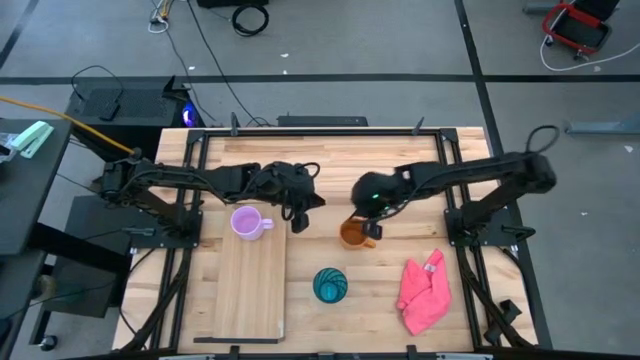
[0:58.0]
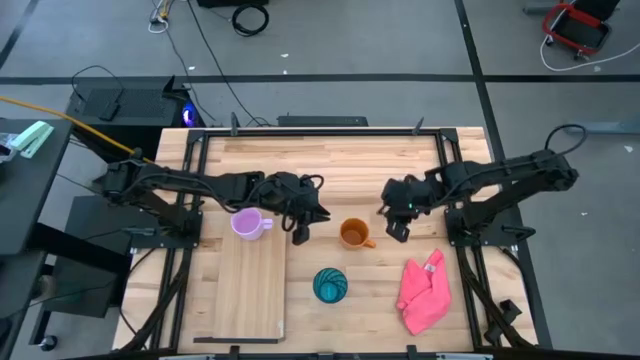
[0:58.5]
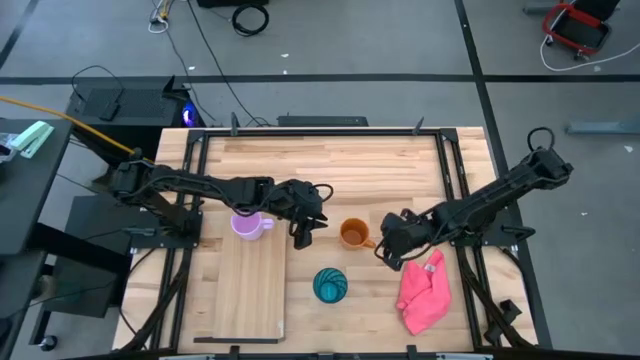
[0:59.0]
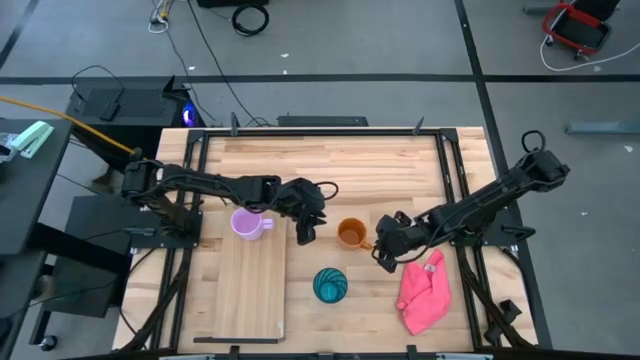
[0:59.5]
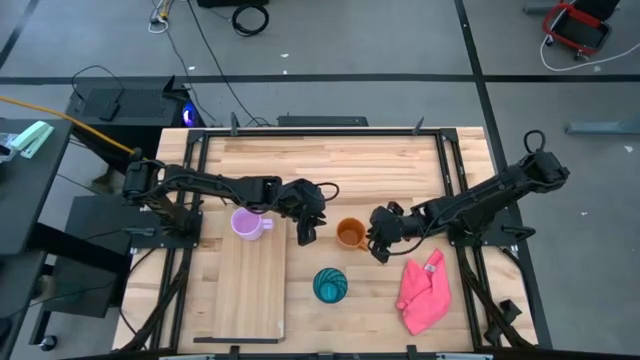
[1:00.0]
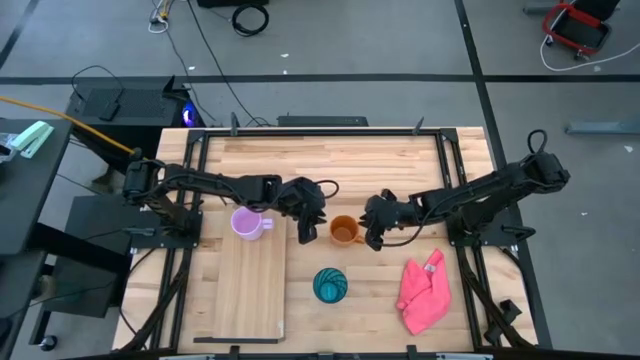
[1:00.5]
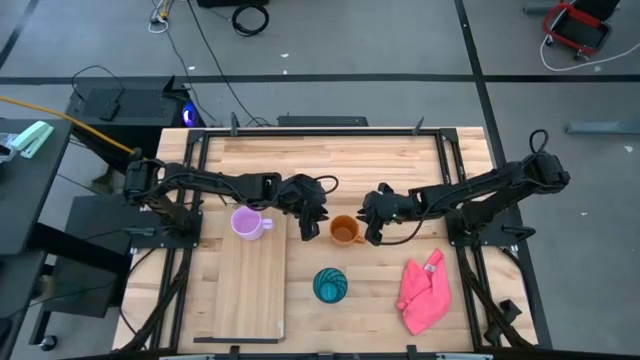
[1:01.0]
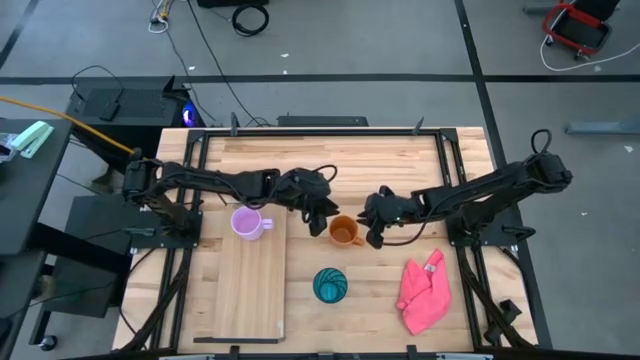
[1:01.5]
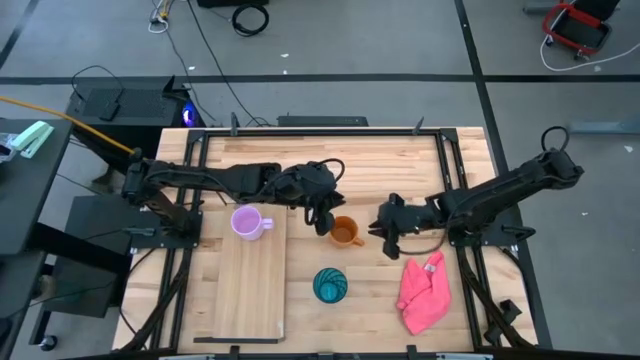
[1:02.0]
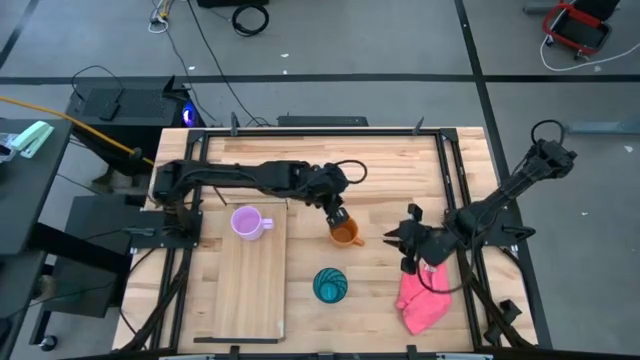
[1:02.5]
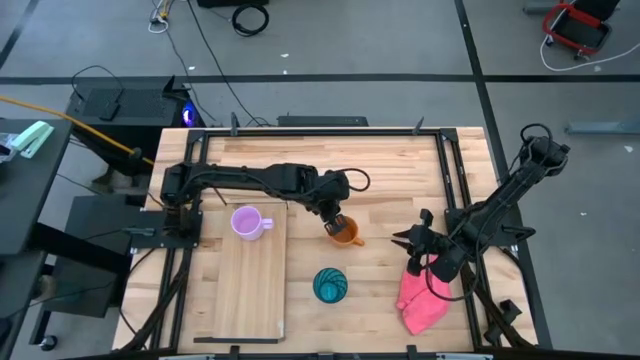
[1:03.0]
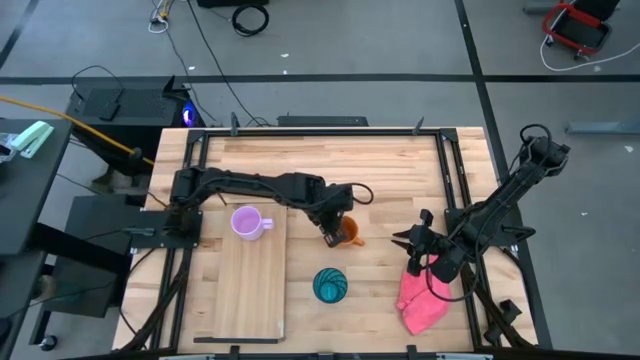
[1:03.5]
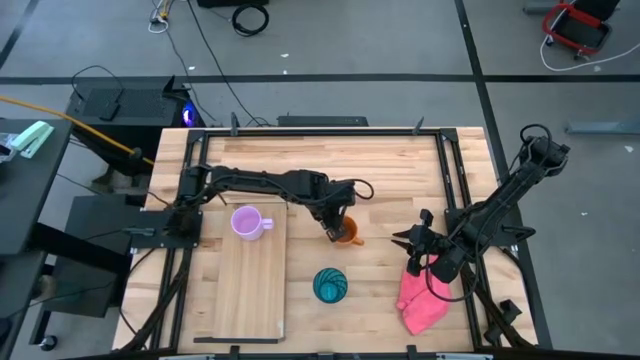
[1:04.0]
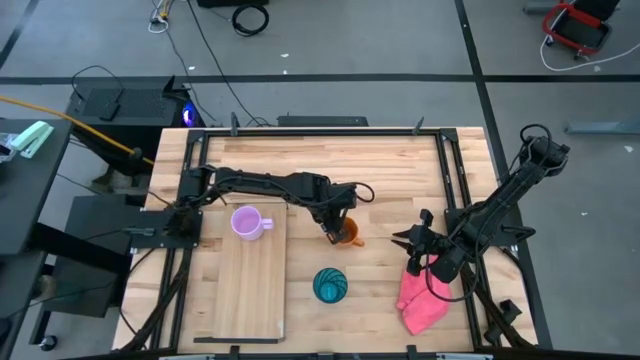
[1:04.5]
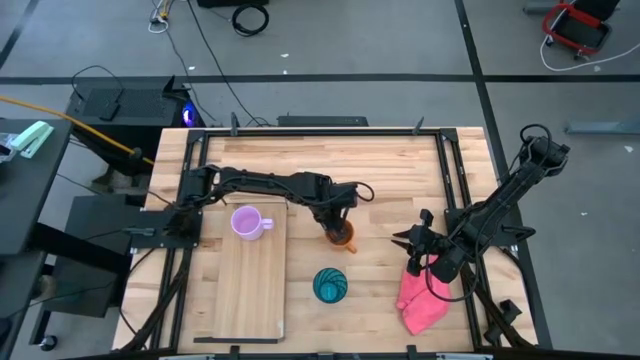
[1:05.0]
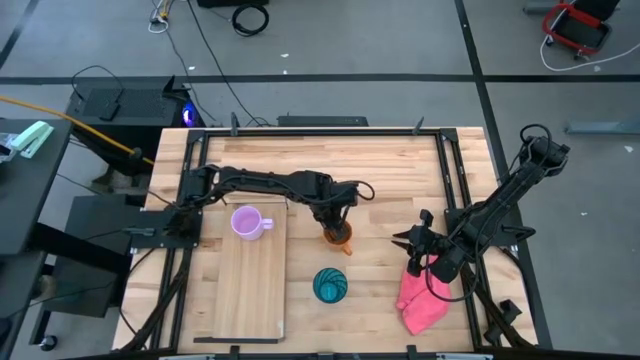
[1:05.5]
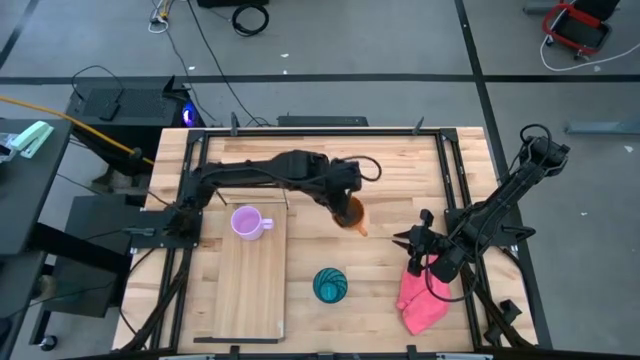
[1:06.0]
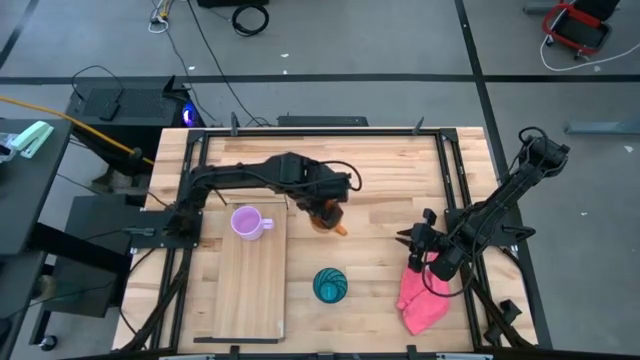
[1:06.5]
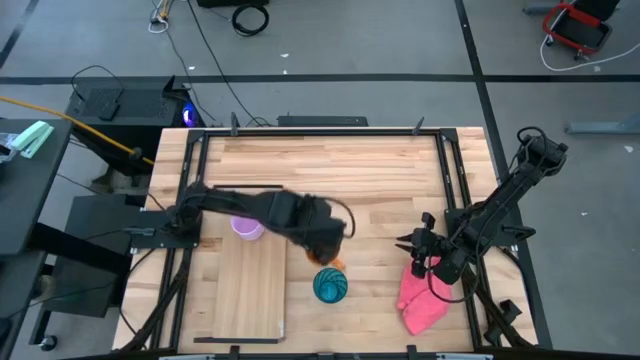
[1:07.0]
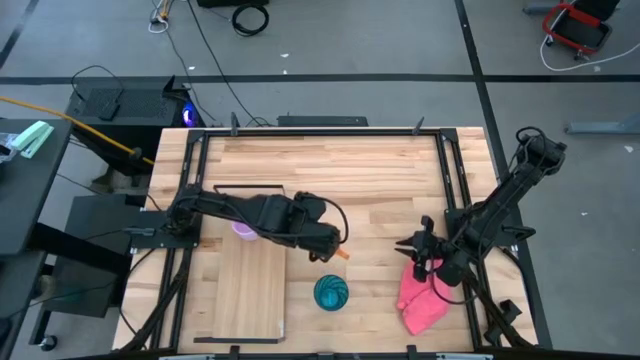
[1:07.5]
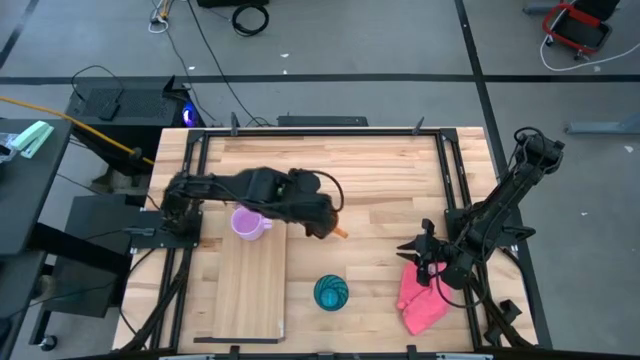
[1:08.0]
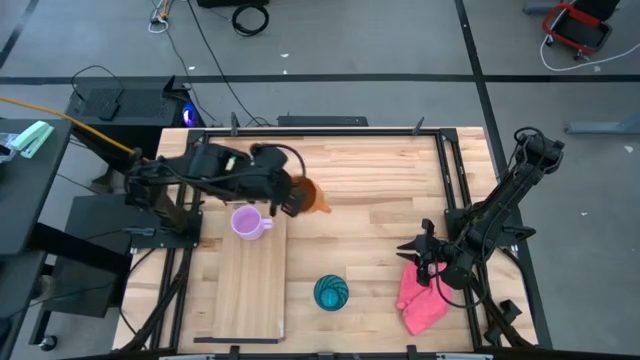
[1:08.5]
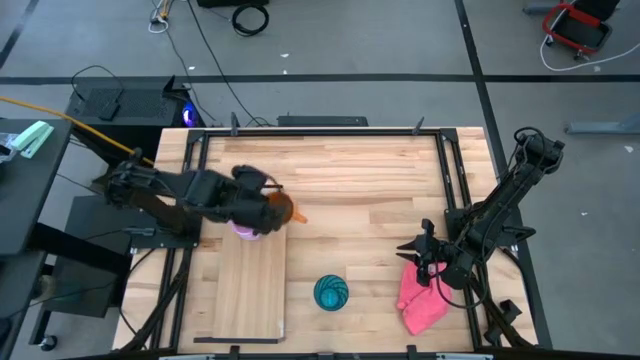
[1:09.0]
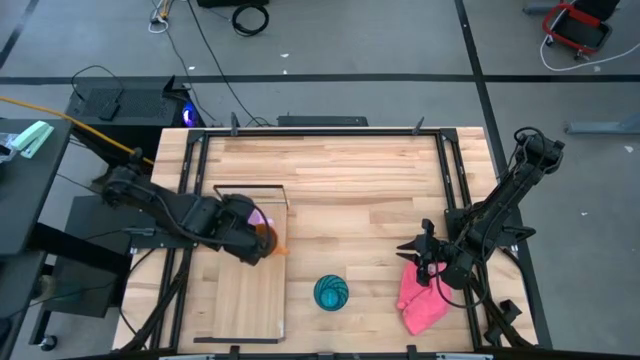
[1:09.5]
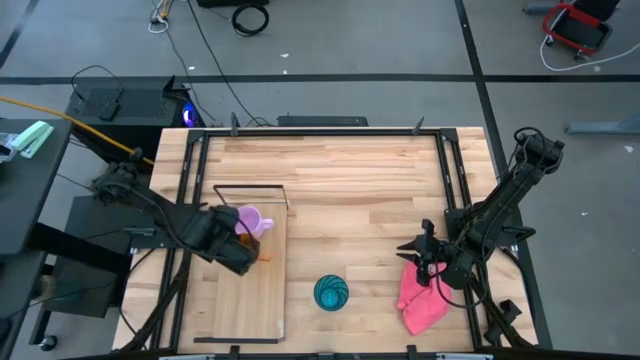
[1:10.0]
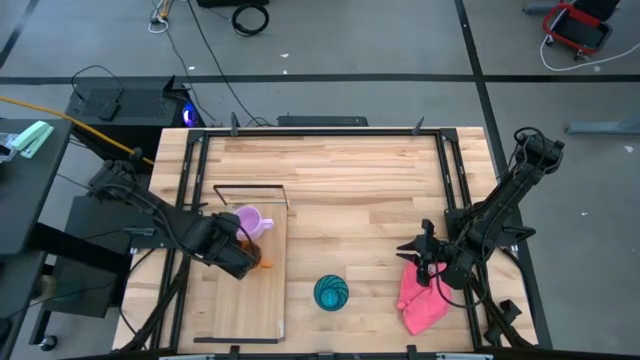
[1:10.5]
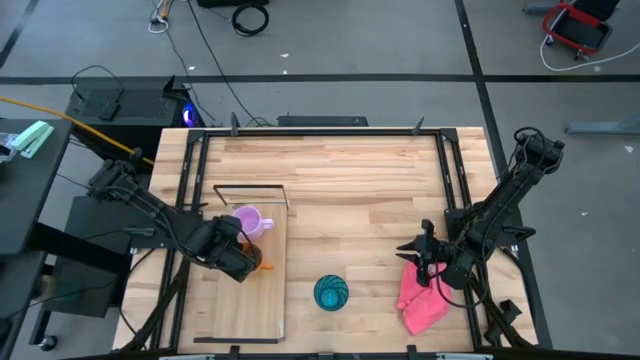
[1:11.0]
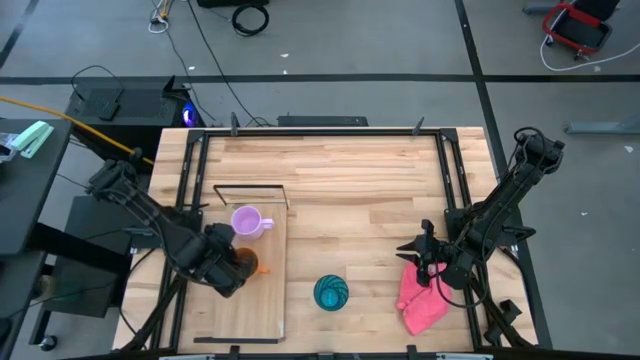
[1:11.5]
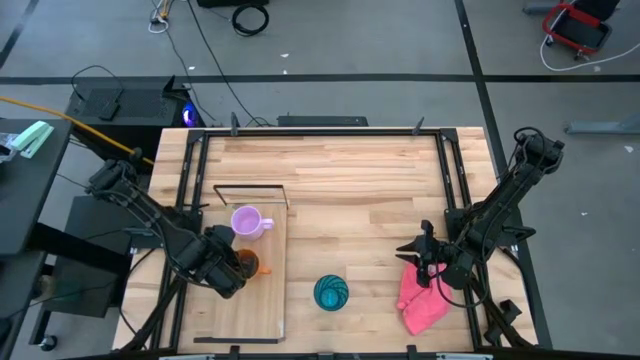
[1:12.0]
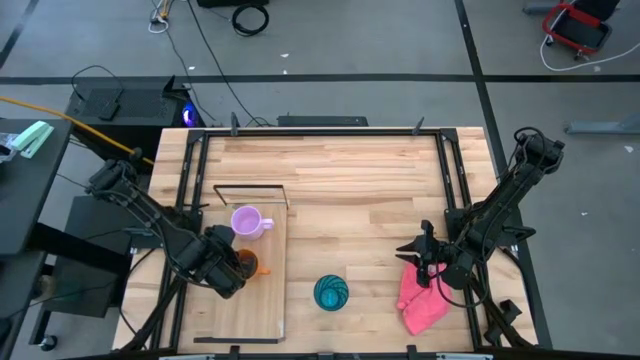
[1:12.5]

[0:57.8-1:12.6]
Task: Stack small to large cups/mugs on shelf
Put the orange cup on the shelf

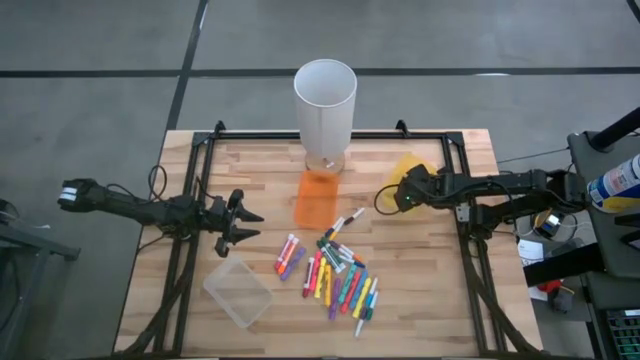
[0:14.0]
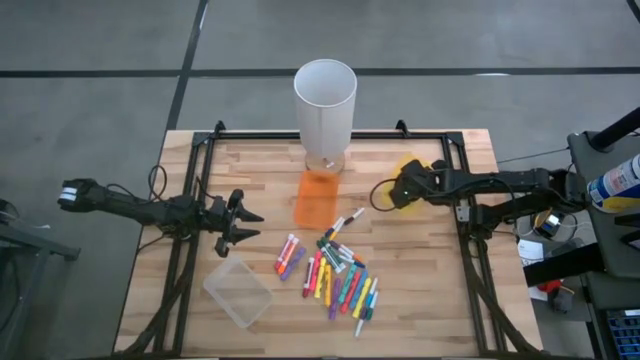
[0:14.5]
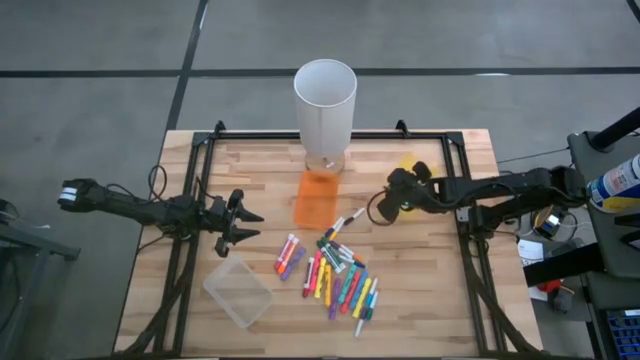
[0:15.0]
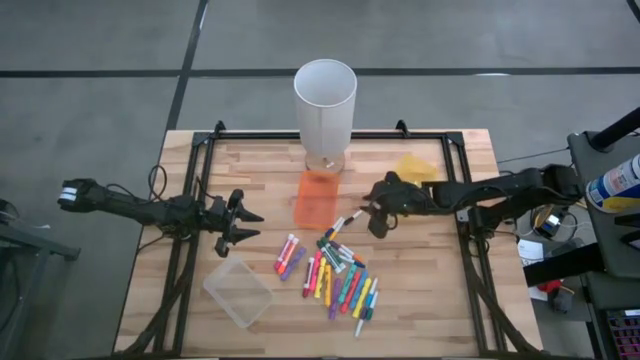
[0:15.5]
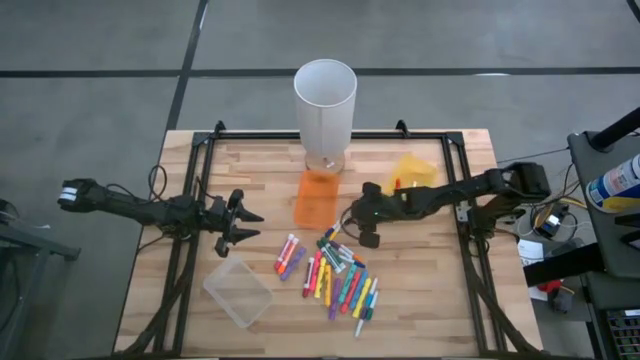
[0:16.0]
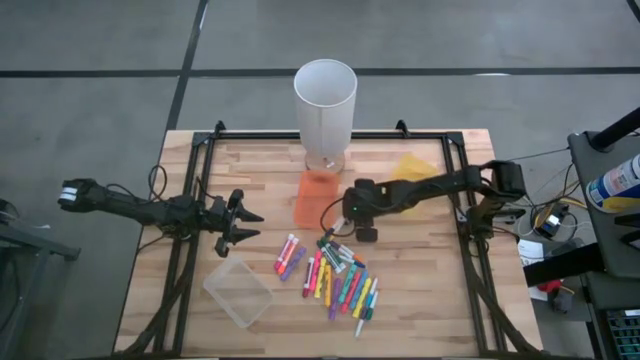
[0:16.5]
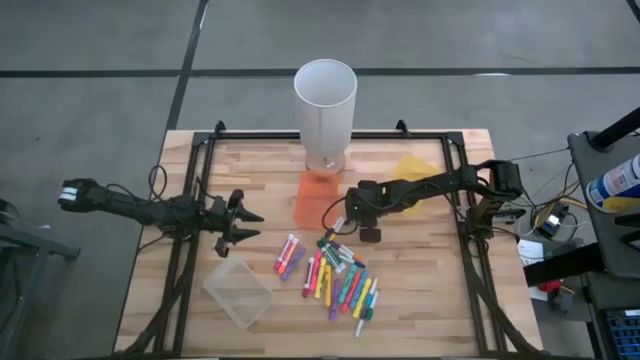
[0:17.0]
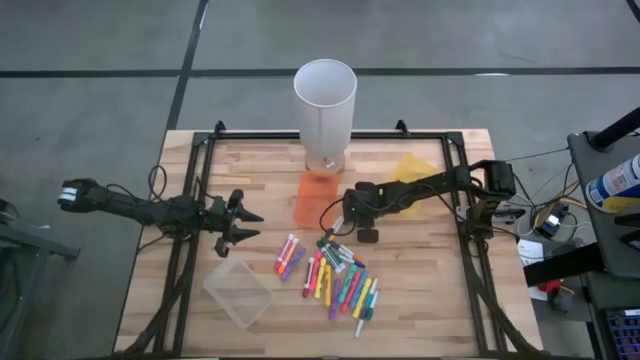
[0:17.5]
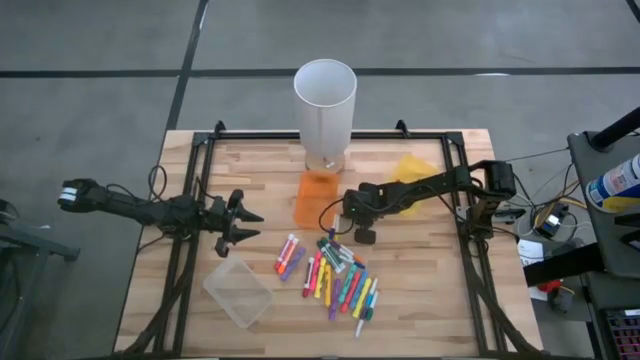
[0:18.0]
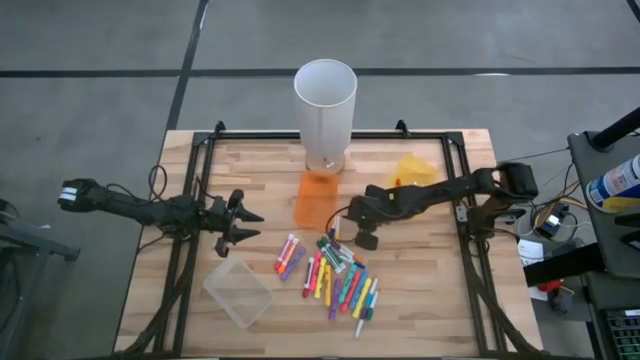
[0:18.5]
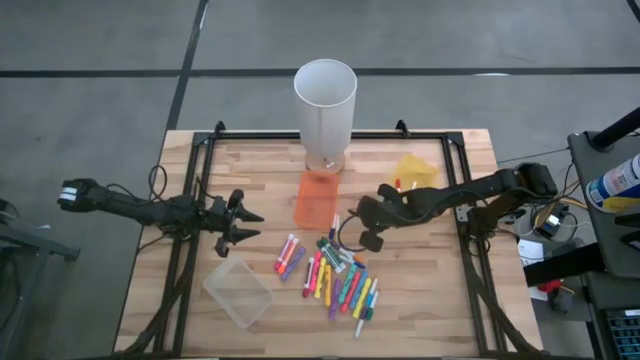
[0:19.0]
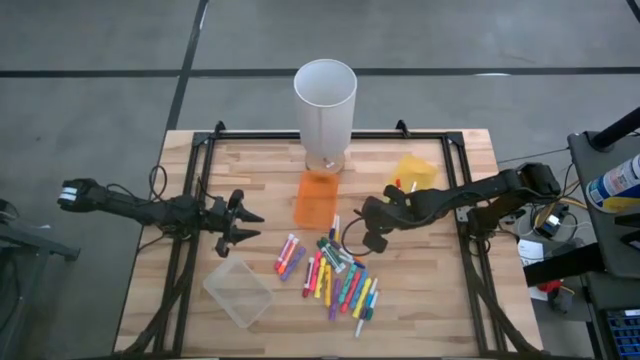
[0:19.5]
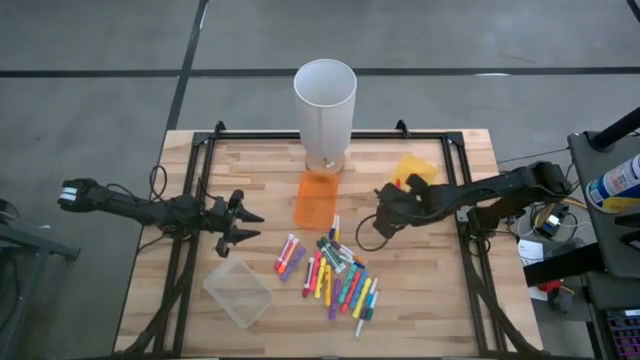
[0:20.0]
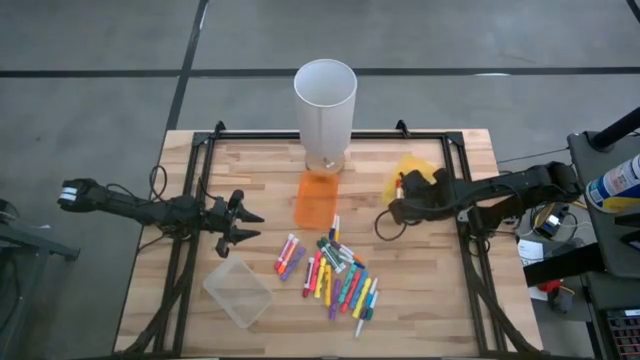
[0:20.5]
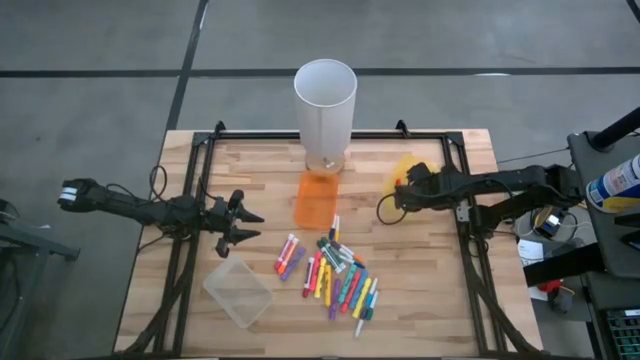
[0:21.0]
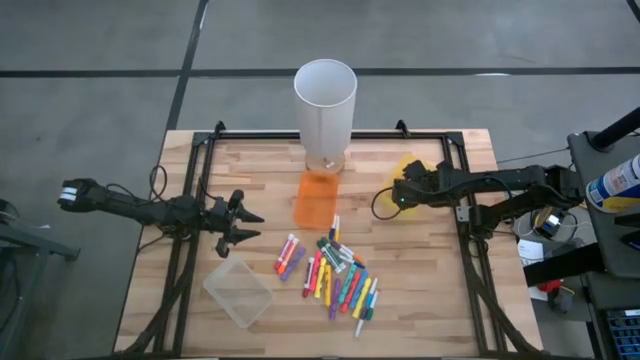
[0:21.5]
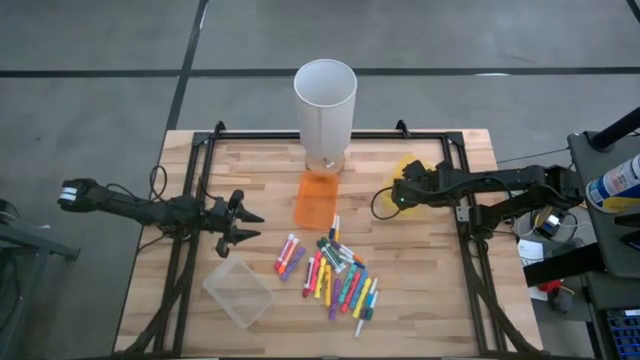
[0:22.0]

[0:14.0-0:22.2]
Task: Pick & Place Markers
Put the small black marker pen into the yellow bin
